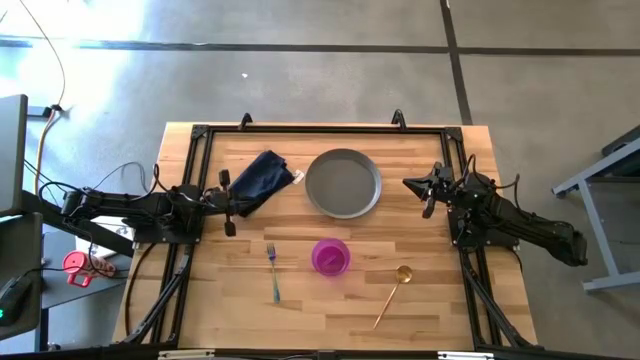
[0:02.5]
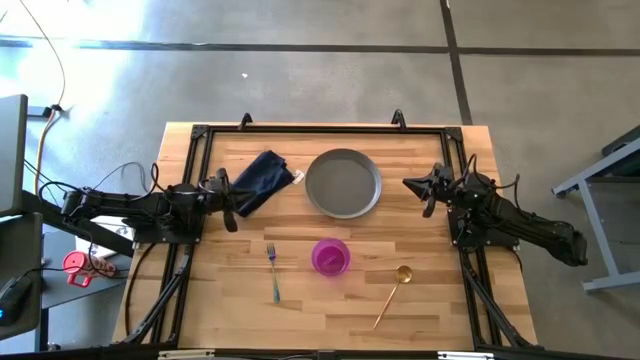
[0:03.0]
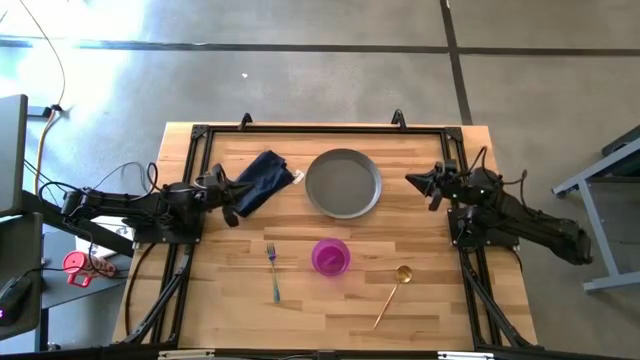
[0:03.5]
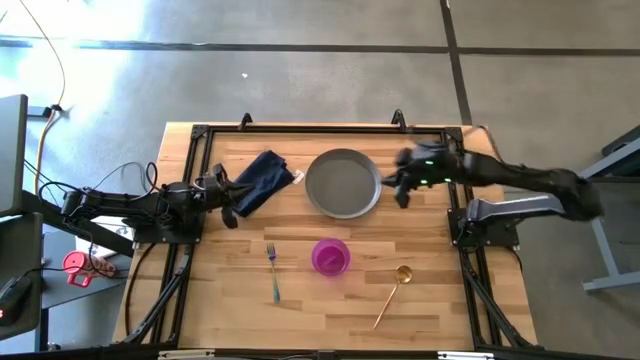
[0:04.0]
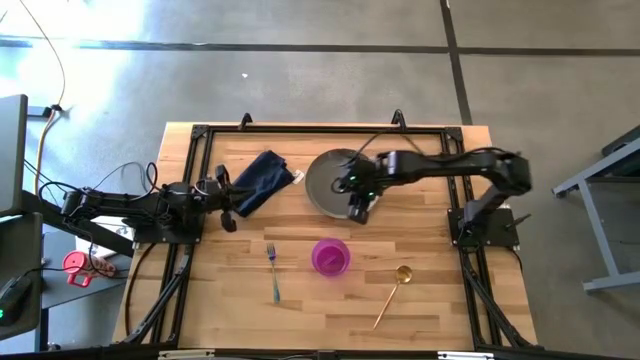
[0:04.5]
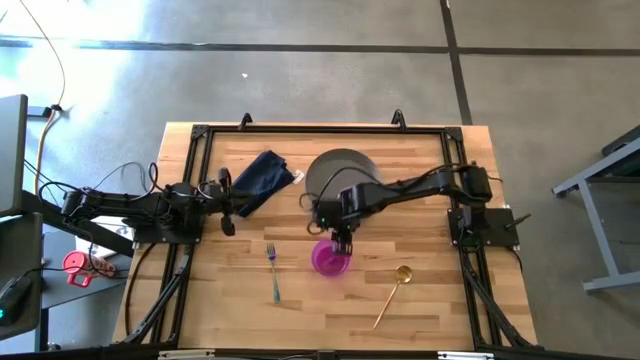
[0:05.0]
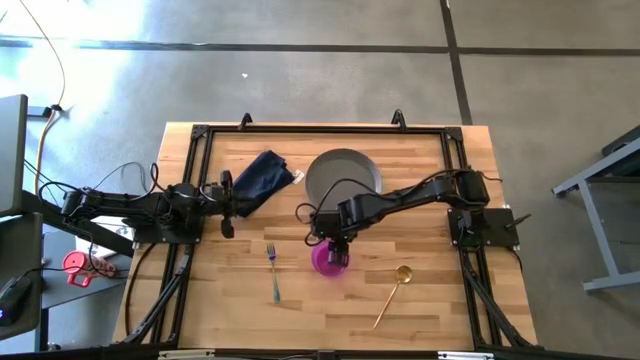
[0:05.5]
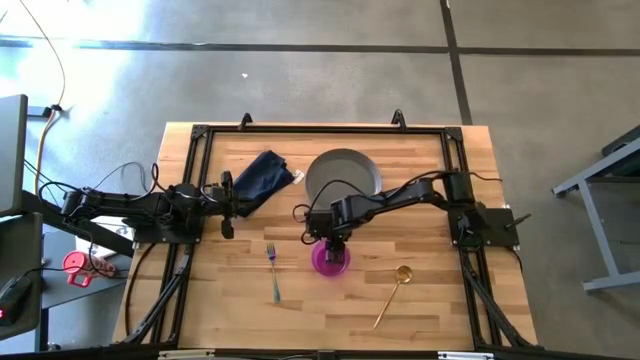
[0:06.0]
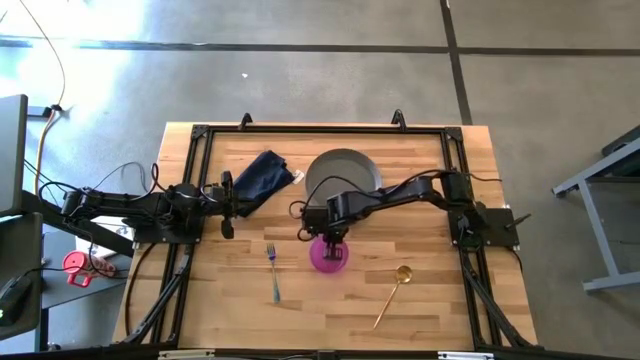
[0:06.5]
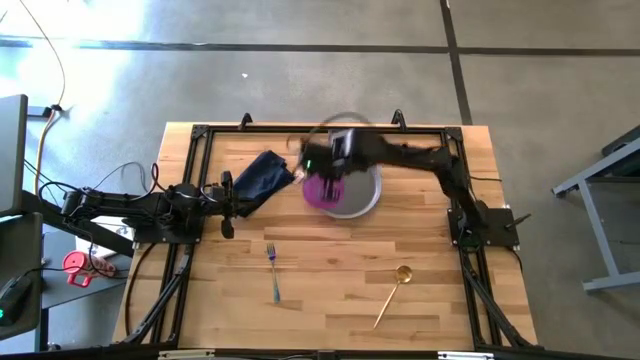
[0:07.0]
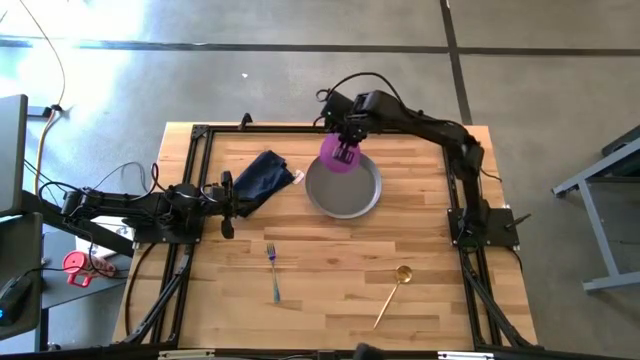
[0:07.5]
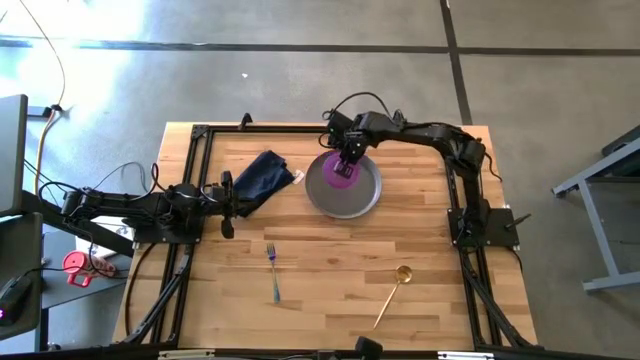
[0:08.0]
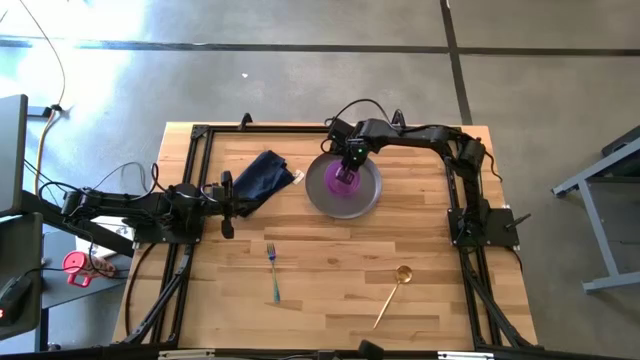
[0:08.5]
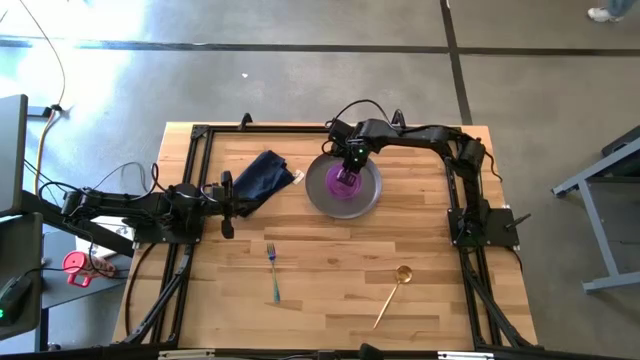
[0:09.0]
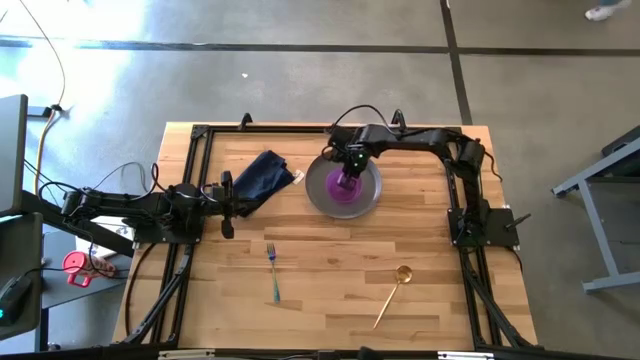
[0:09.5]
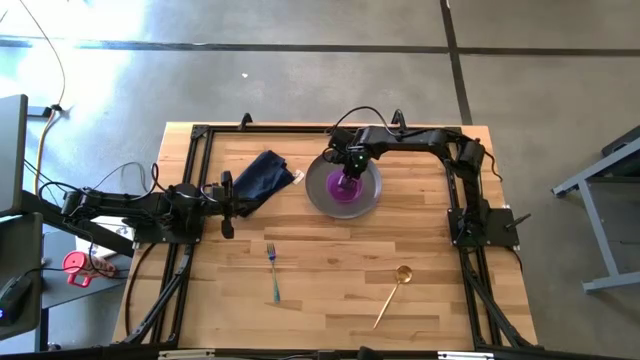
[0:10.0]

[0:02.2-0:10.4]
Task: Set table place
Put the purple bowl on the gray plate

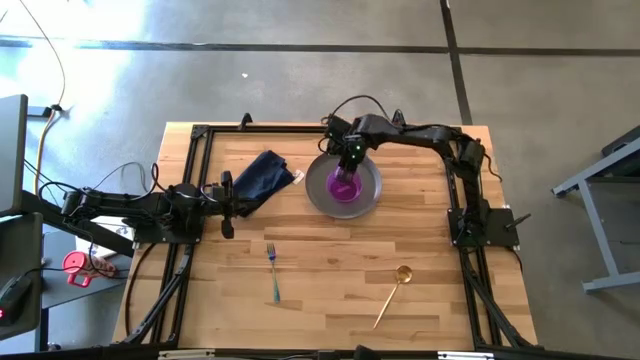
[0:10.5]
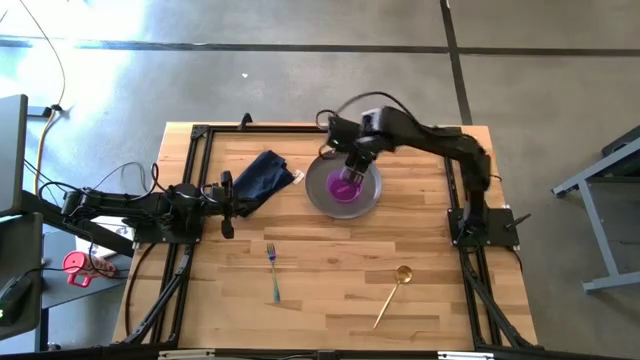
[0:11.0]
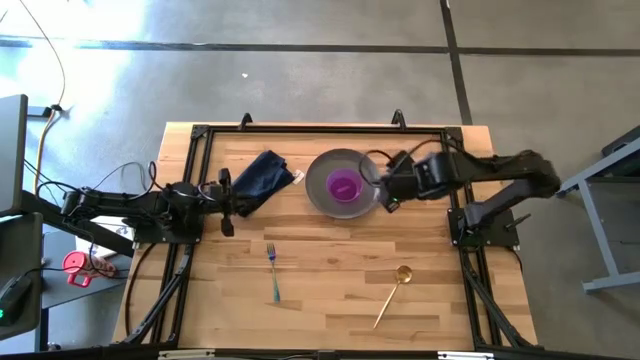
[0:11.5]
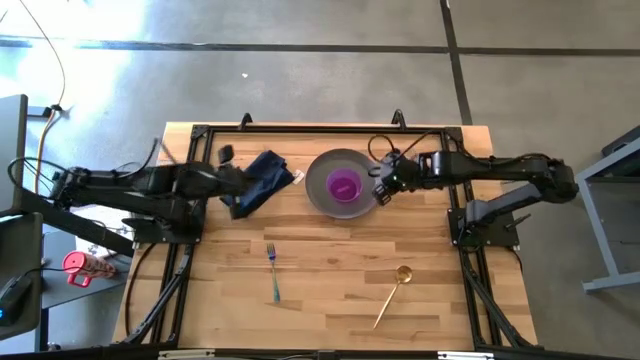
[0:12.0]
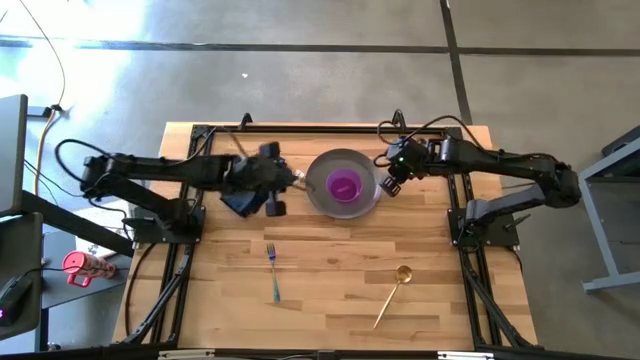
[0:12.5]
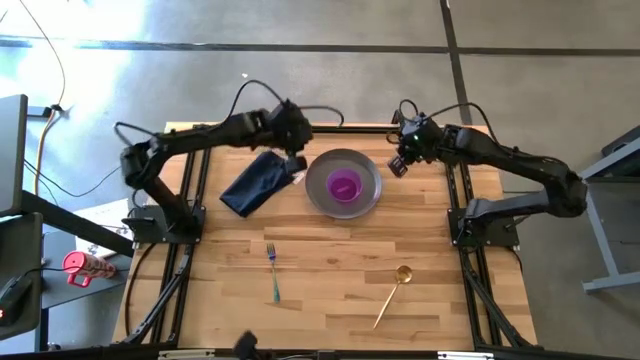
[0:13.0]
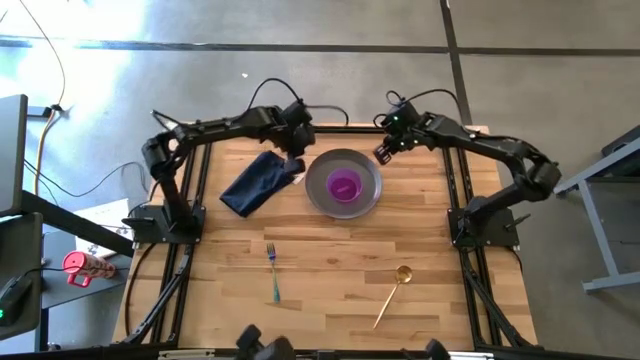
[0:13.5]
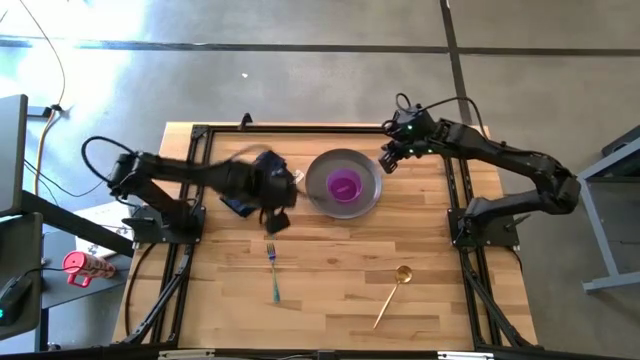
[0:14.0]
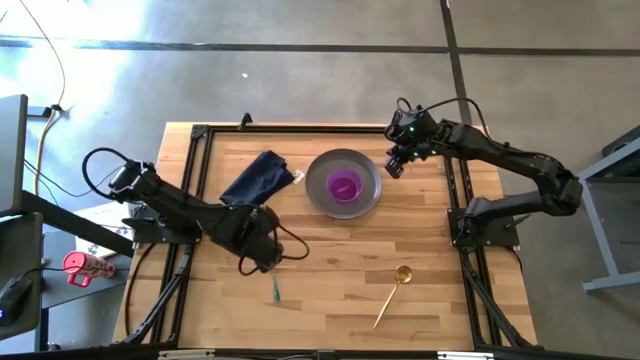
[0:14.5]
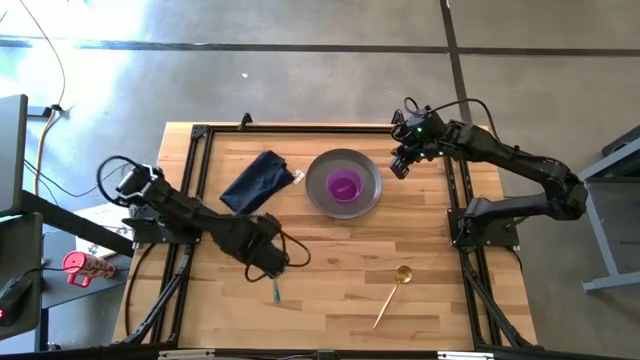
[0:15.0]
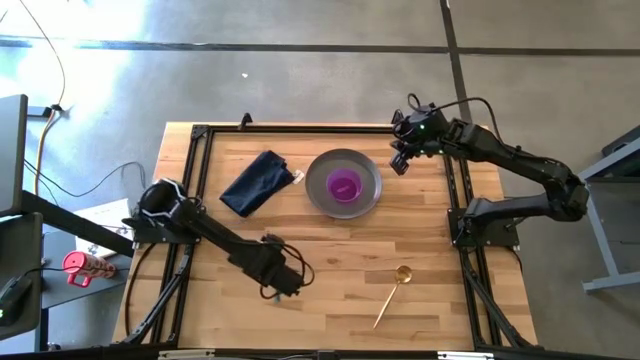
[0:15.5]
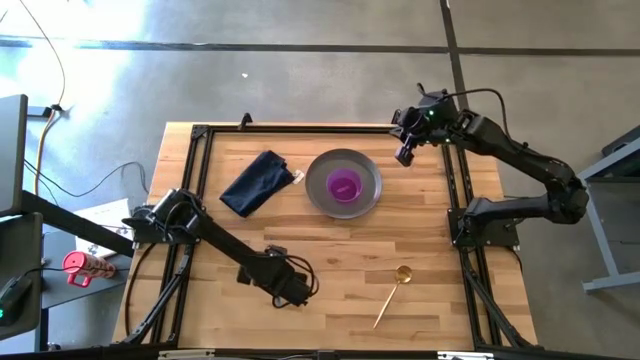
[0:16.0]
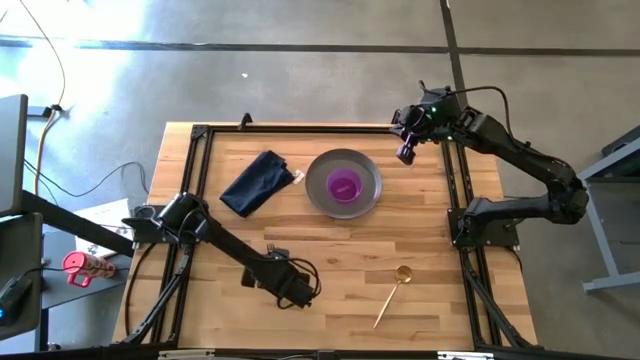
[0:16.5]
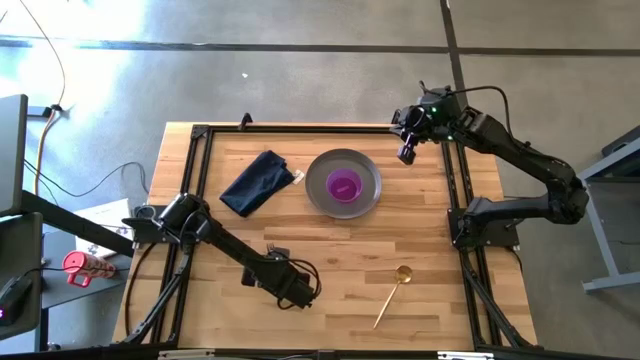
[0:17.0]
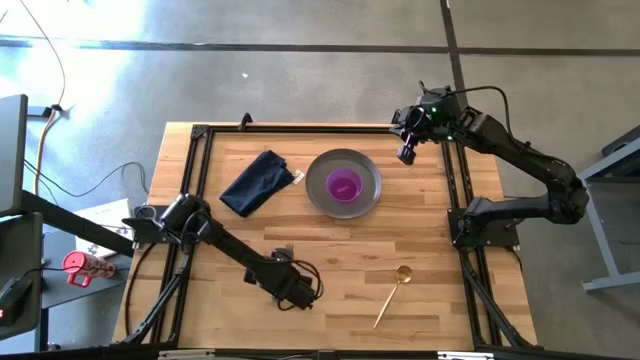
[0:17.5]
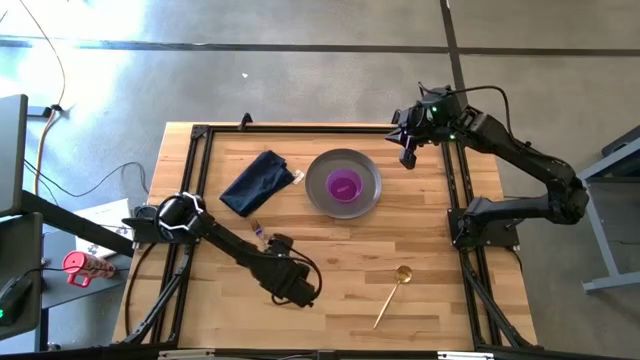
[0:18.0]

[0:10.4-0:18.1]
Put the blue fork to the right of gray plate

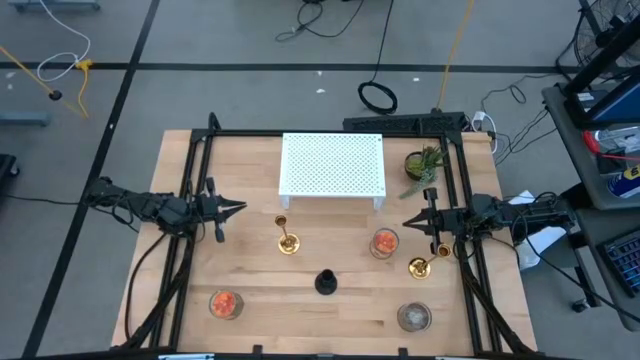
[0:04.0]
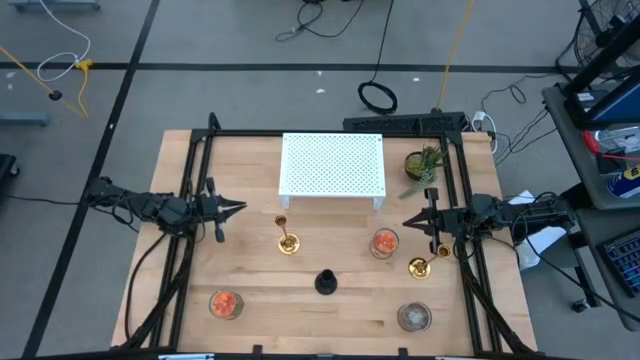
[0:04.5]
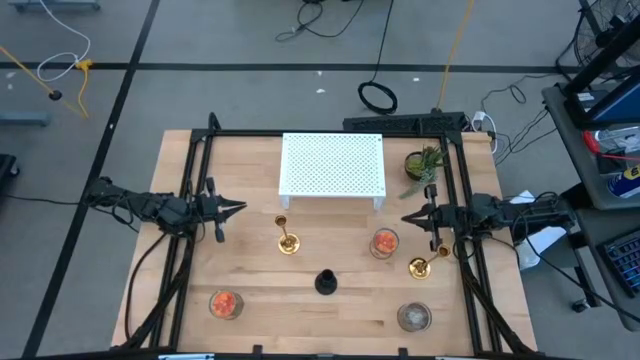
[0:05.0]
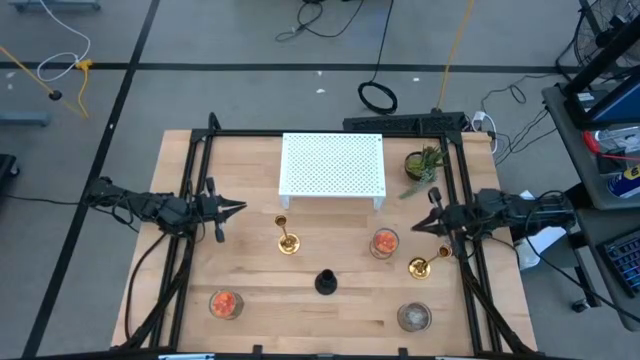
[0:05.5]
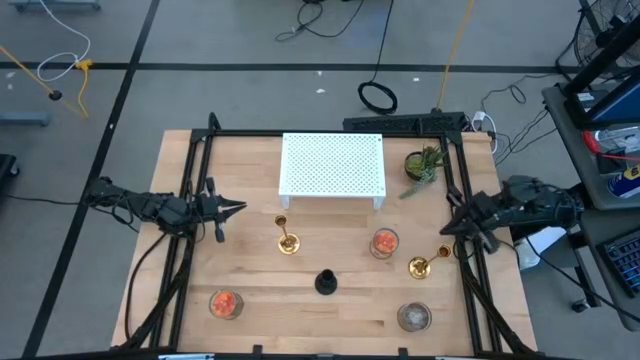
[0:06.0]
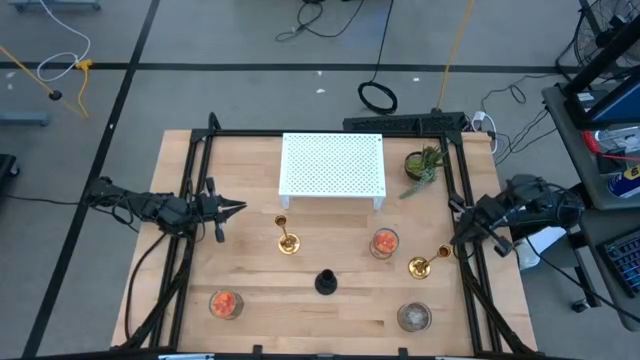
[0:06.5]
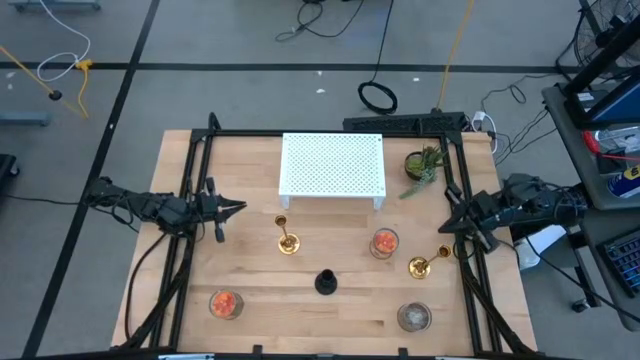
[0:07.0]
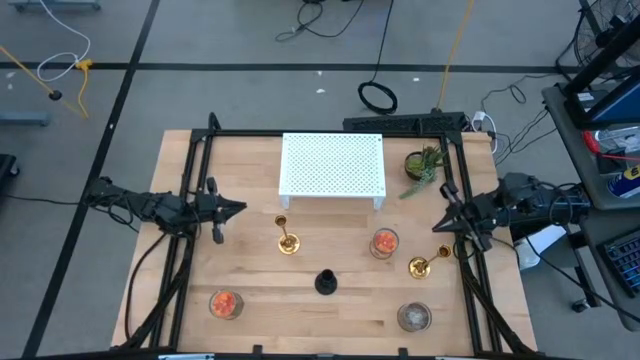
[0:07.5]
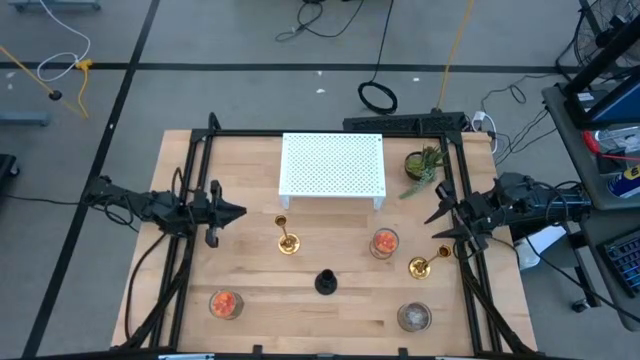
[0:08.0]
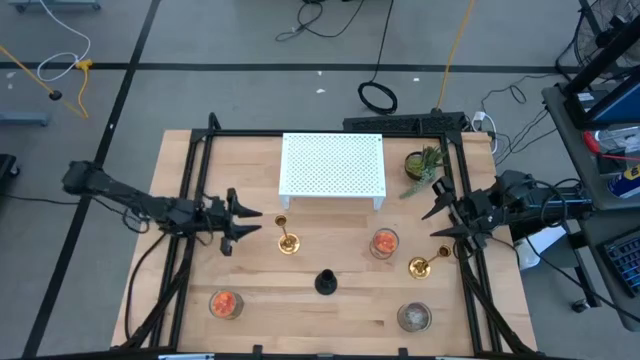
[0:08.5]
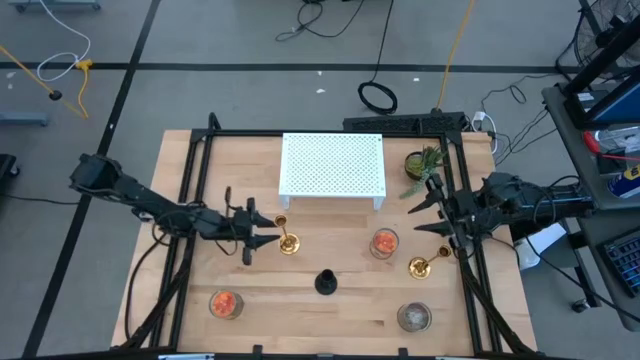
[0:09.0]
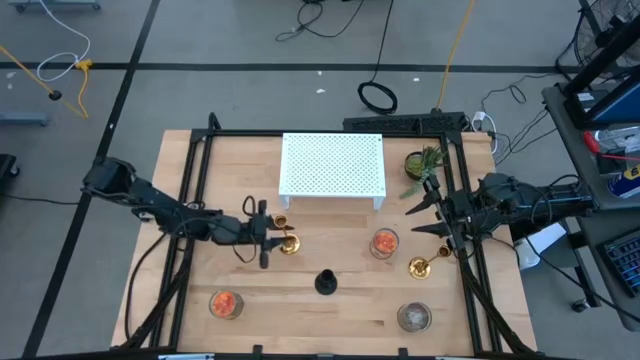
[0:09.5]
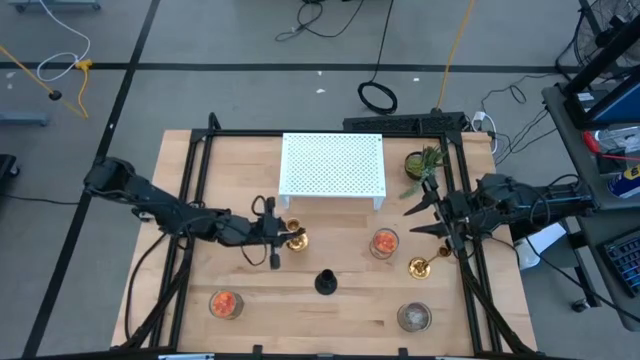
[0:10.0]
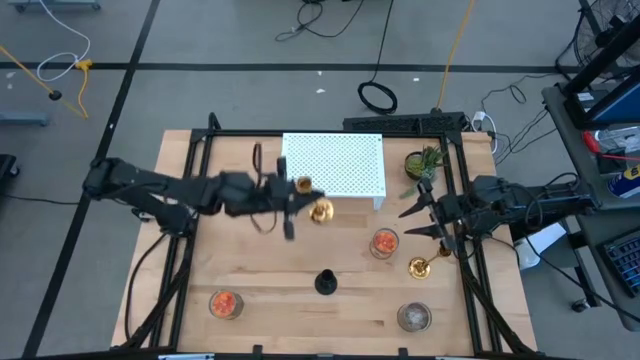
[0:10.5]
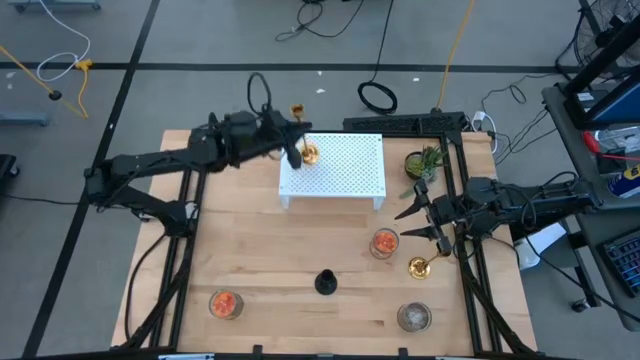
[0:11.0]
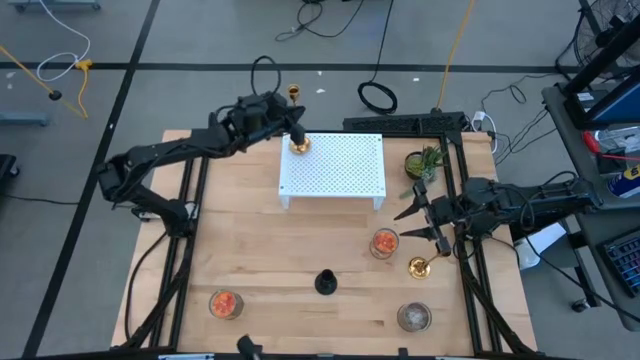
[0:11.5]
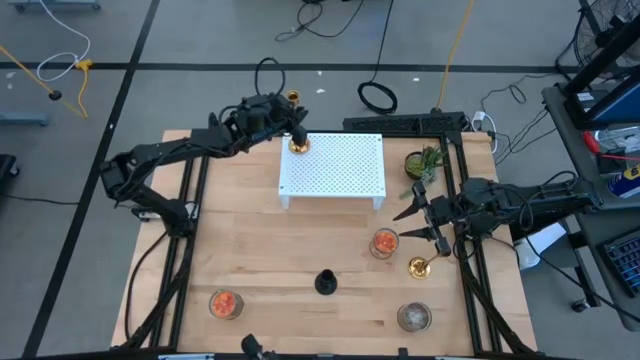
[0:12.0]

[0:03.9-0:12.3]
Task: Pick & Place candle stick holders
Put the left golden candle holder on the shelf
